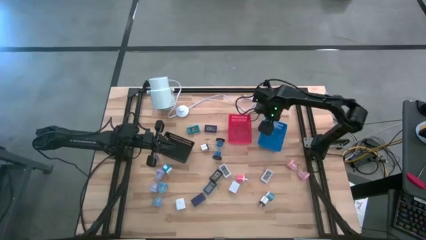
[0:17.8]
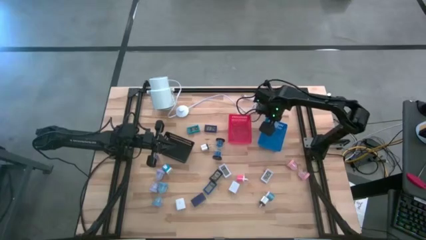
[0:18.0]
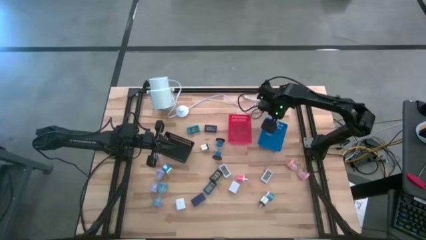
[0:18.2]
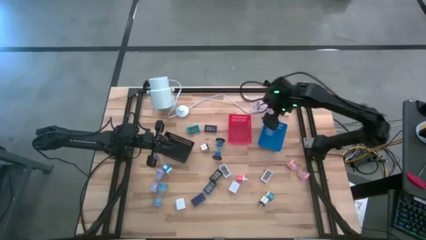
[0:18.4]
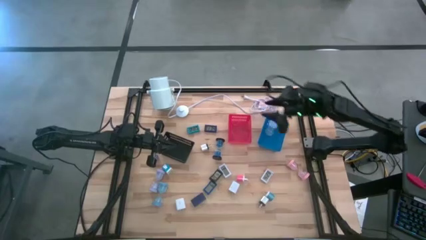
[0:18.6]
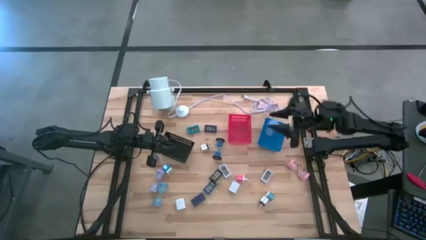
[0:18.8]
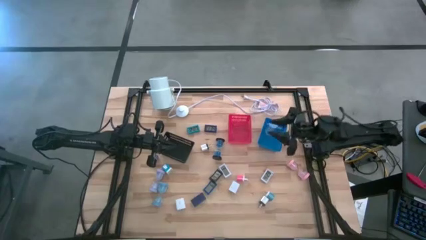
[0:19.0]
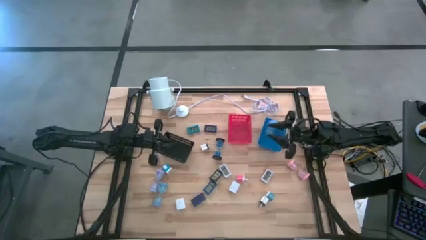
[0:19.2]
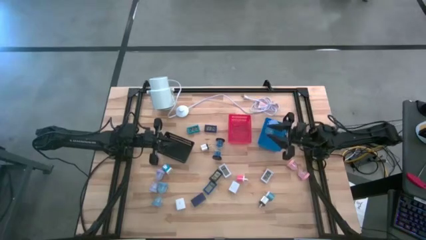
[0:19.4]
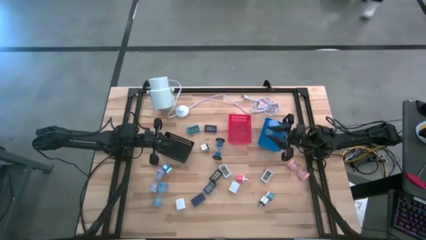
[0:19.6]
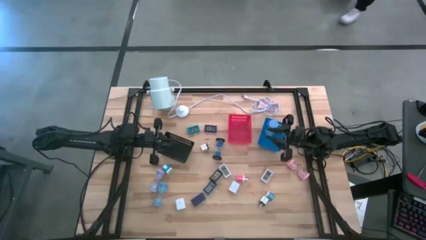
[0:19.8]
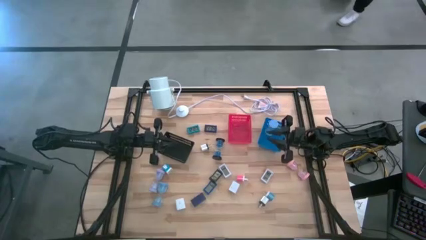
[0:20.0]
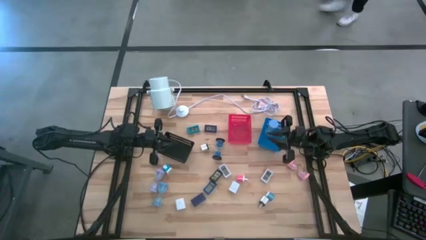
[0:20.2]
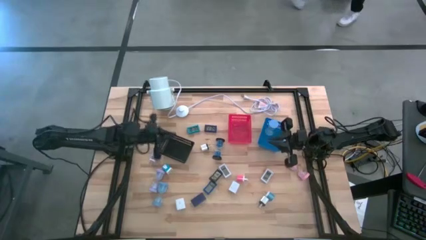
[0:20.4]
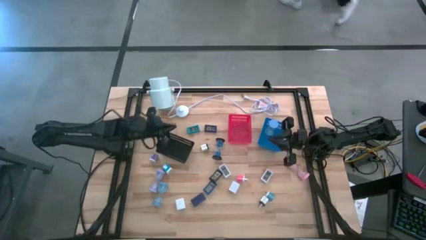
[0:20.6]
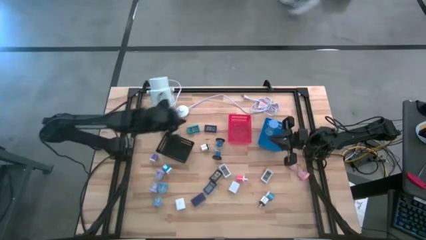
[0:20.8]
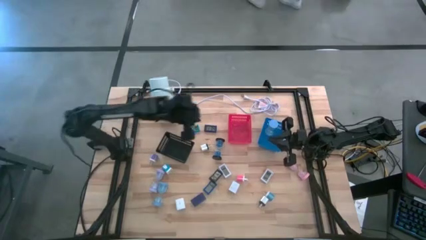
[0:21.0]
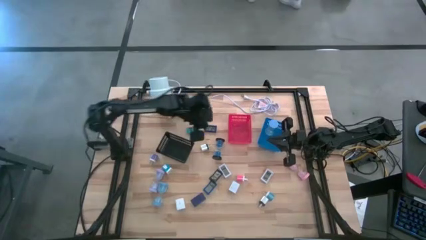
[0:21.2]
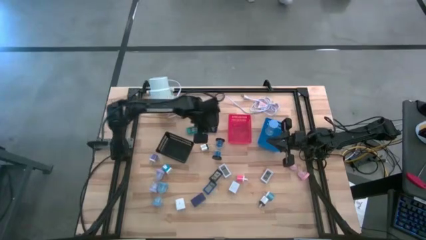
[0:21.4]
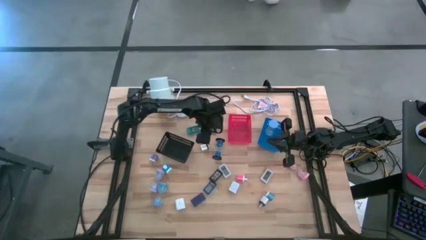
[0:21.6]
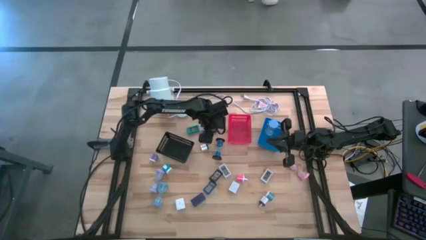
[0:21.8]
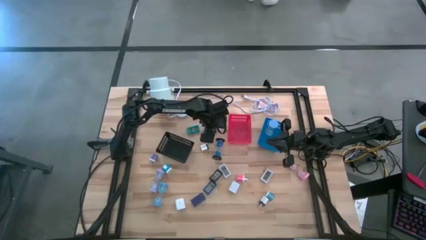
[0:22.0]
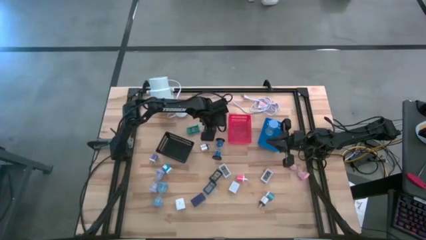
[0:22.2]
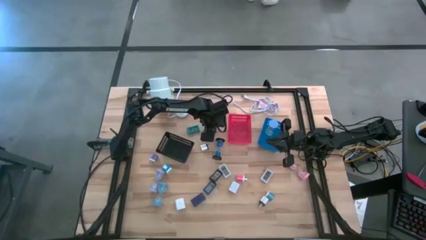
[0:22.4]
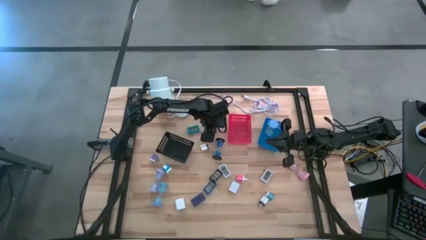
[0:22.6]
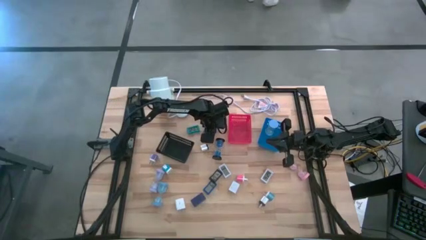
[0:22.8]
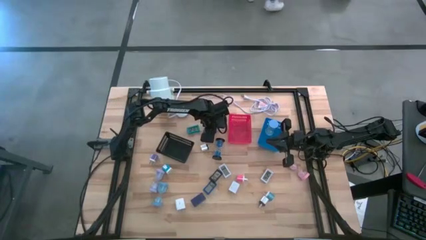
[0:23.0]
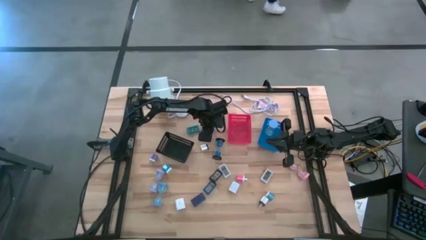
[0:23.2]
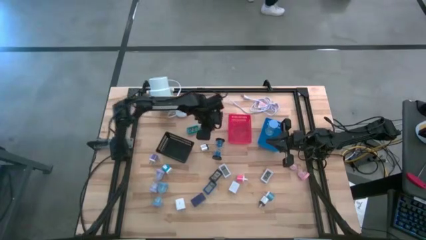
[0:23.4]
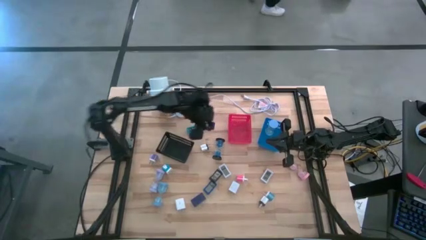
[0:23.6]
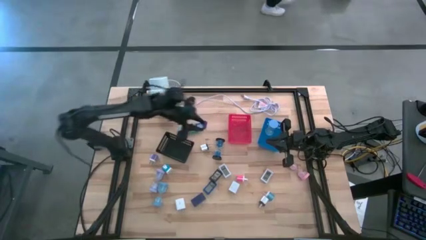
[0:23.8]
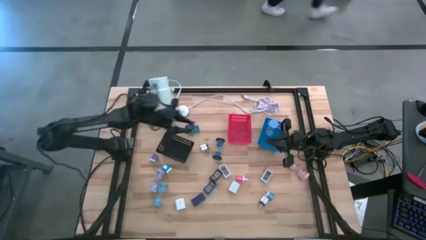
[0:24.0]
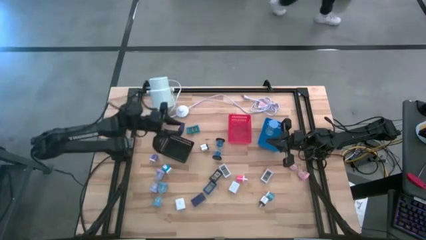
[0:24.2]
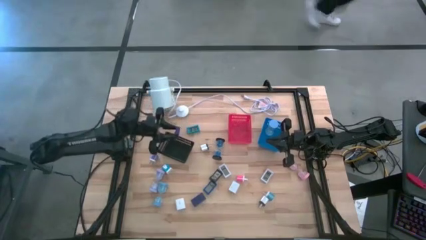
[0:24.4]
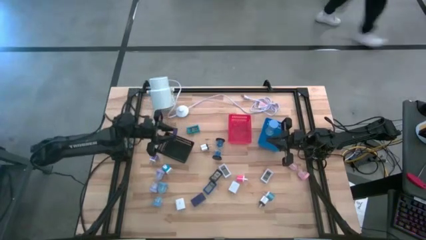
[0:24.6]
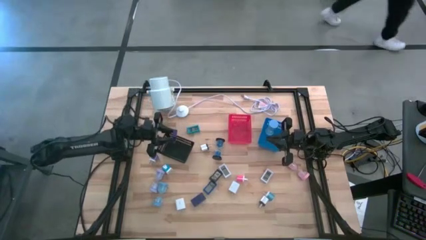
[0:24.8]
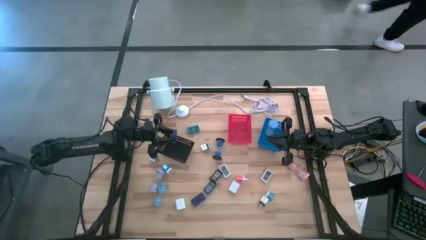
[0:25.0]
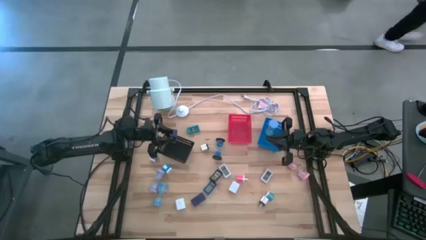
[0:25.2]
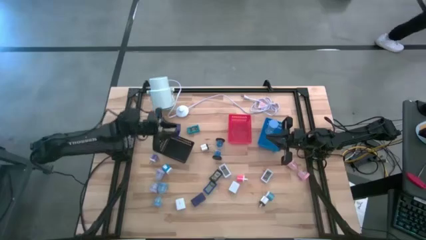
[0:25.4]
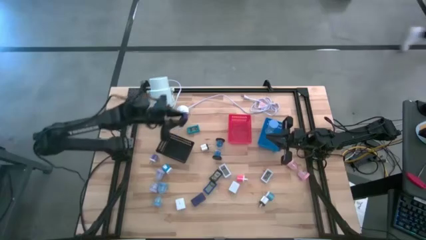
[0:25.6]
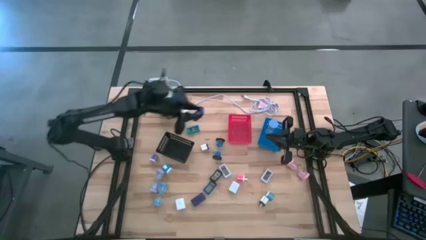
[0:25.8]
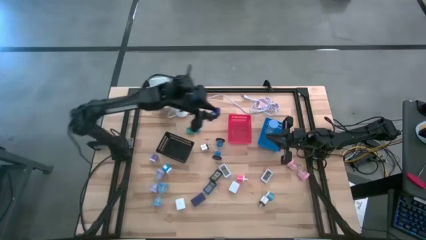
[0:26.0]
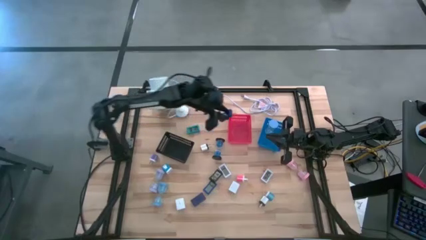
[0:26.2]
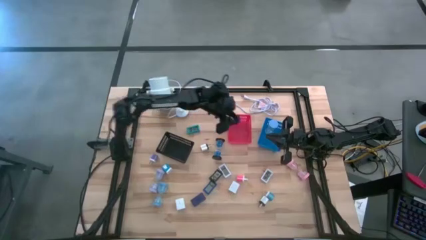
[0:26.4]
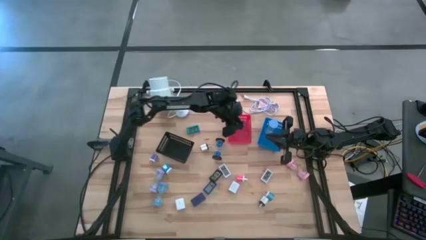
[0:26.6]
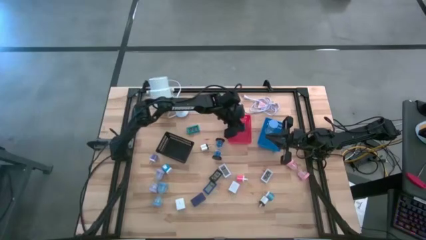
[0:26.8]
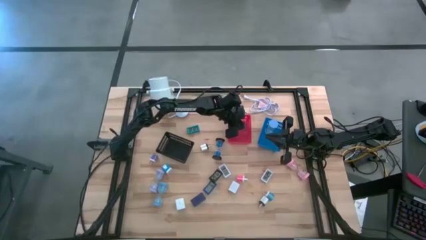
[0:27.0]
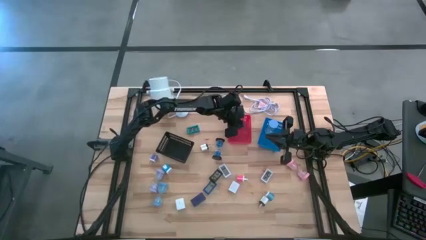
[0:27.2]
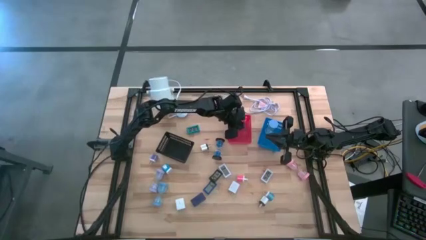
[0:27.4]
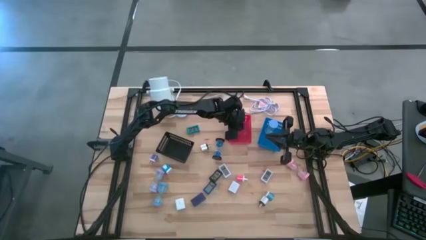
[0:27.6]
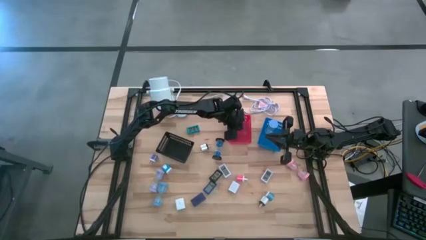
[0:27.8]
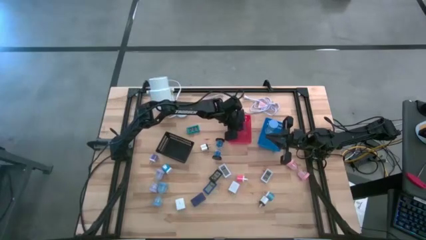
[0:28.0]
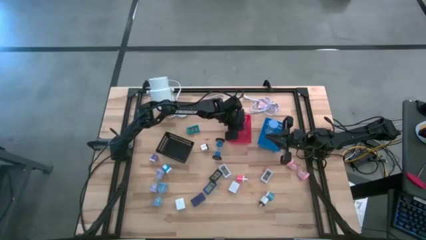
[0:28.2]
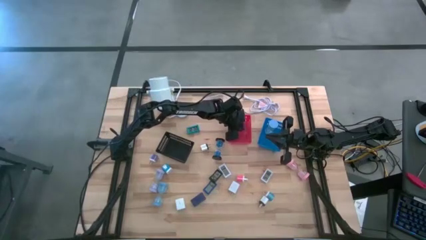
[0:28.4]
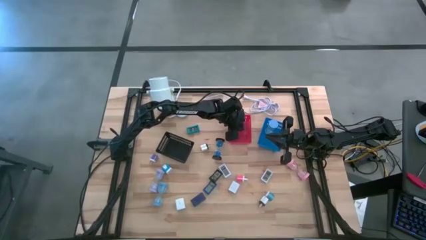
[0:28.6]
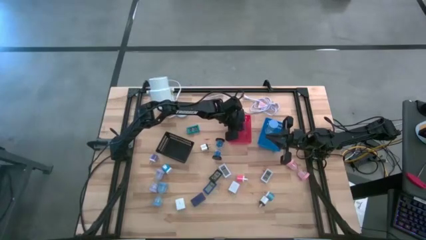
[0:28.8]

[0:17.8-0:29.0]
Task: Pick & Place Office items
Put the violet digital clock into the red bin
